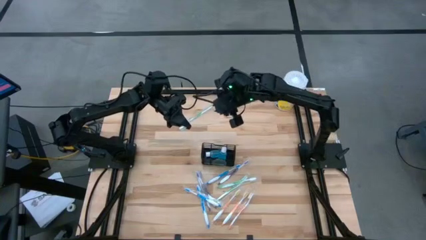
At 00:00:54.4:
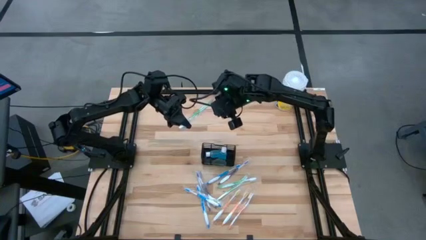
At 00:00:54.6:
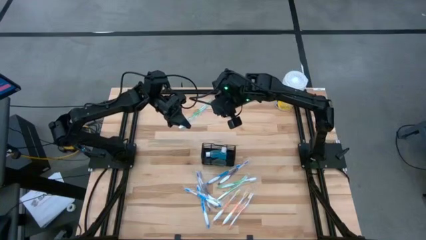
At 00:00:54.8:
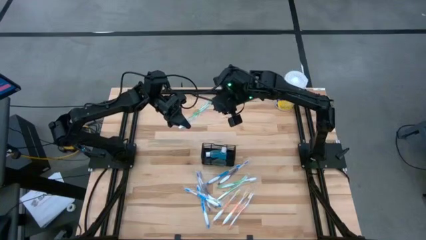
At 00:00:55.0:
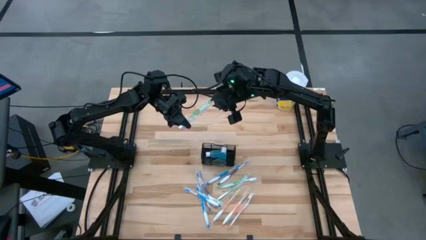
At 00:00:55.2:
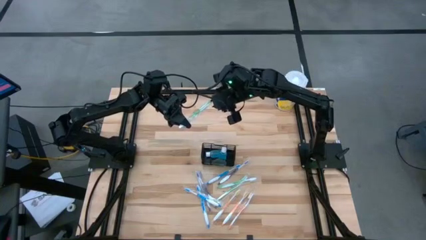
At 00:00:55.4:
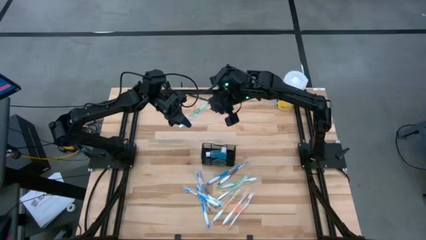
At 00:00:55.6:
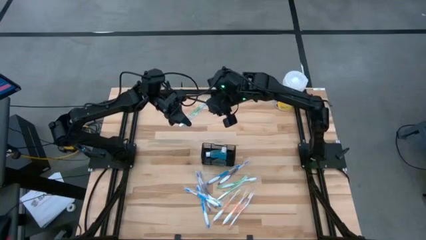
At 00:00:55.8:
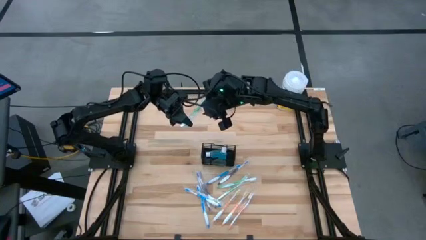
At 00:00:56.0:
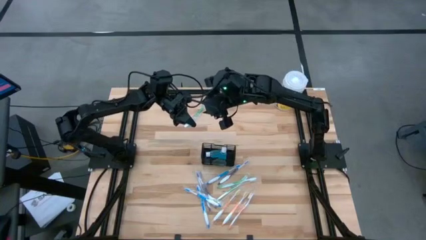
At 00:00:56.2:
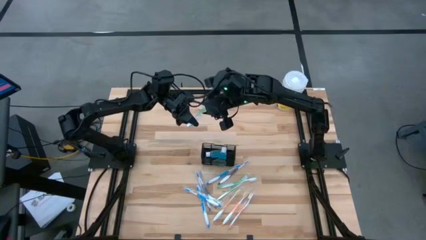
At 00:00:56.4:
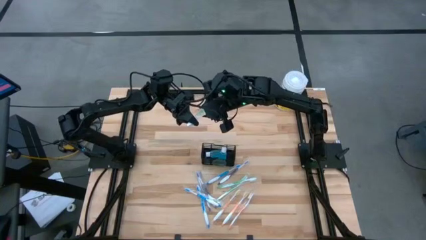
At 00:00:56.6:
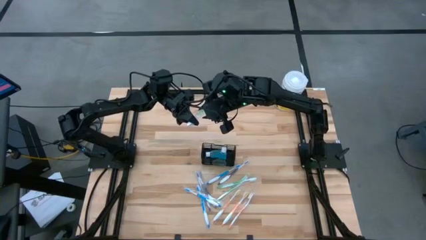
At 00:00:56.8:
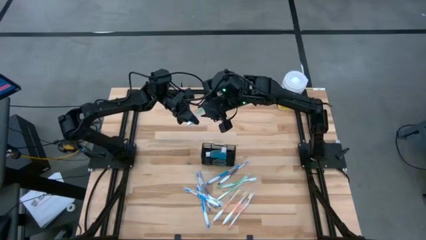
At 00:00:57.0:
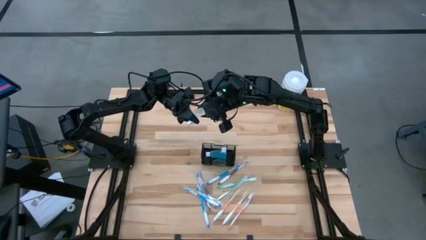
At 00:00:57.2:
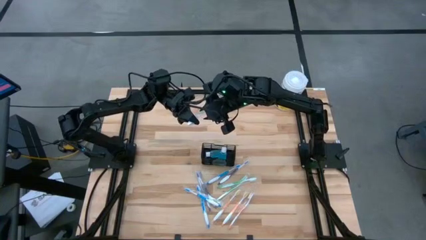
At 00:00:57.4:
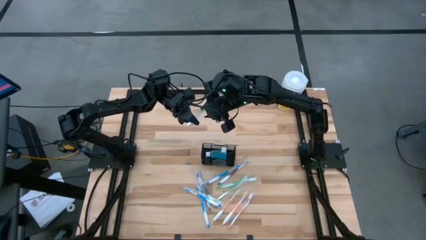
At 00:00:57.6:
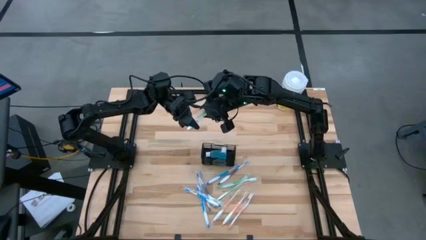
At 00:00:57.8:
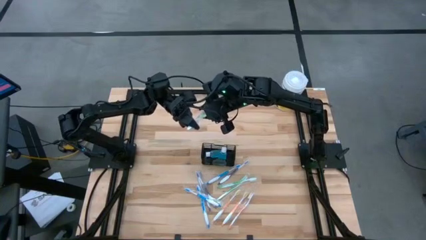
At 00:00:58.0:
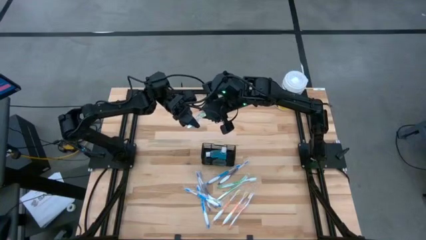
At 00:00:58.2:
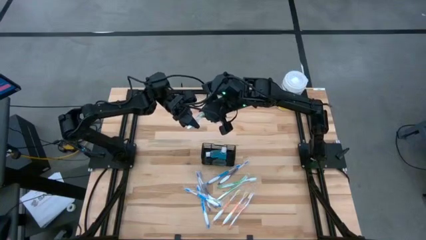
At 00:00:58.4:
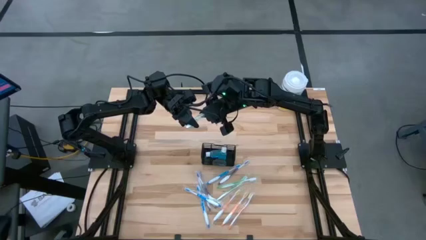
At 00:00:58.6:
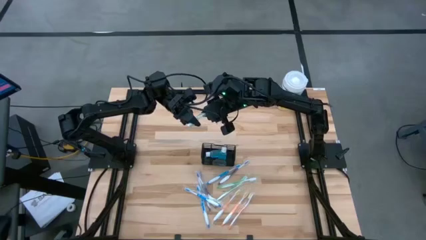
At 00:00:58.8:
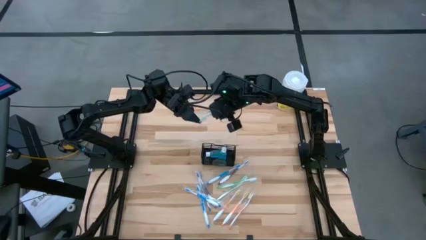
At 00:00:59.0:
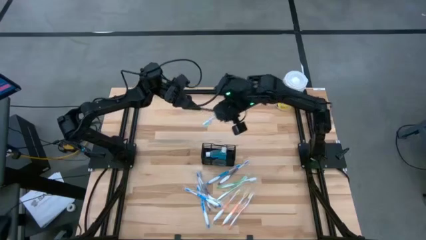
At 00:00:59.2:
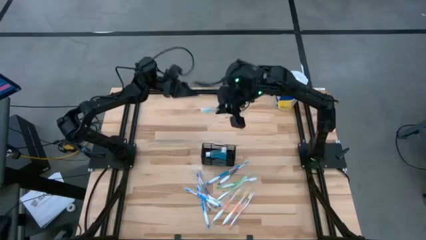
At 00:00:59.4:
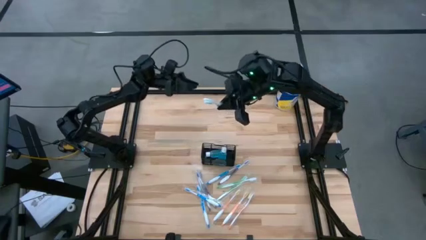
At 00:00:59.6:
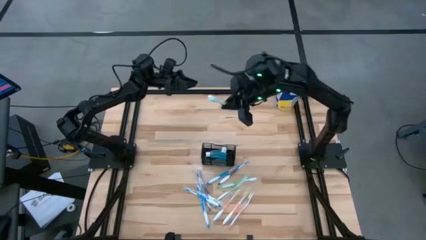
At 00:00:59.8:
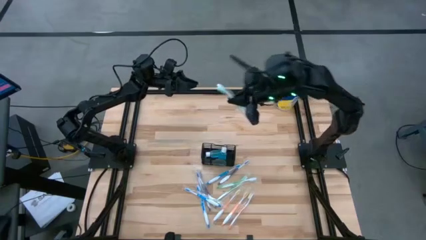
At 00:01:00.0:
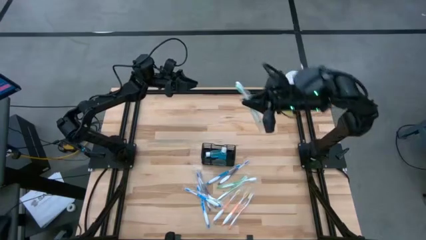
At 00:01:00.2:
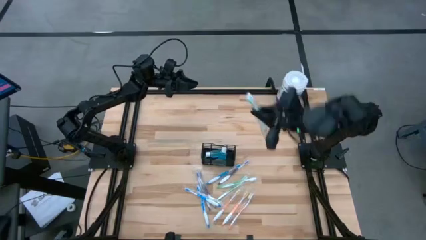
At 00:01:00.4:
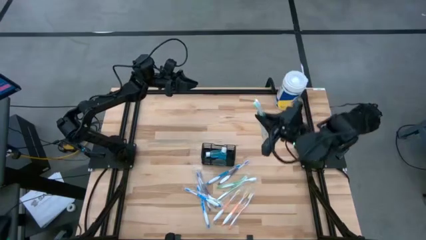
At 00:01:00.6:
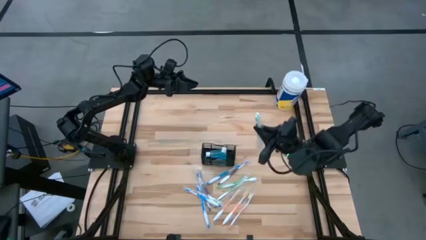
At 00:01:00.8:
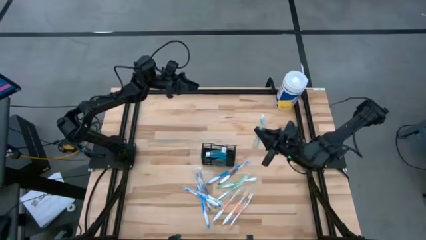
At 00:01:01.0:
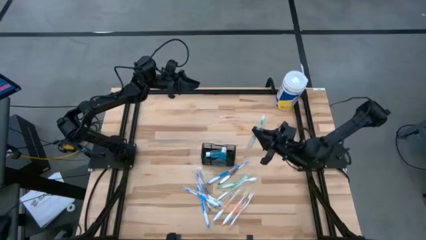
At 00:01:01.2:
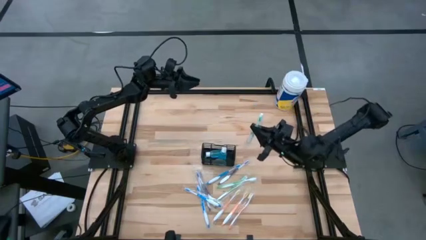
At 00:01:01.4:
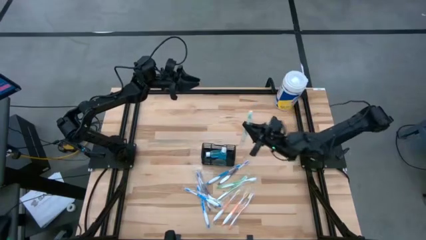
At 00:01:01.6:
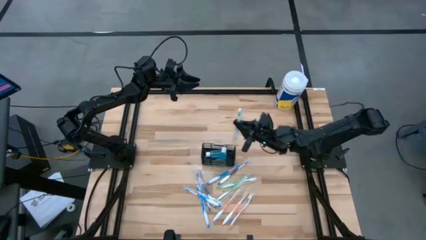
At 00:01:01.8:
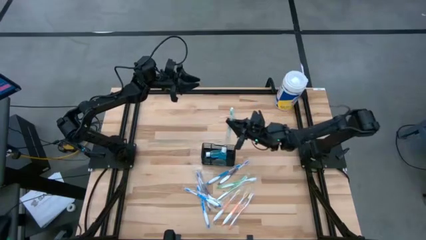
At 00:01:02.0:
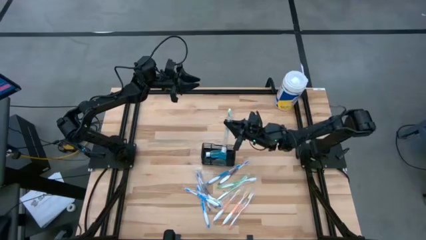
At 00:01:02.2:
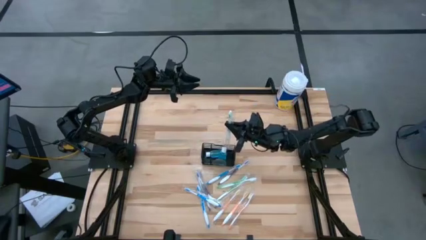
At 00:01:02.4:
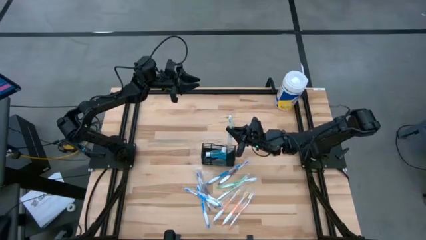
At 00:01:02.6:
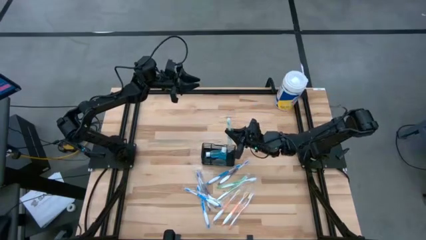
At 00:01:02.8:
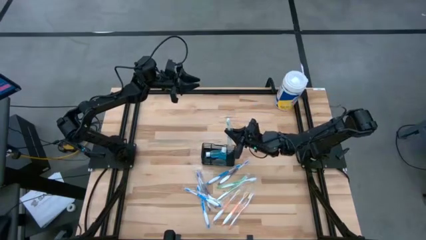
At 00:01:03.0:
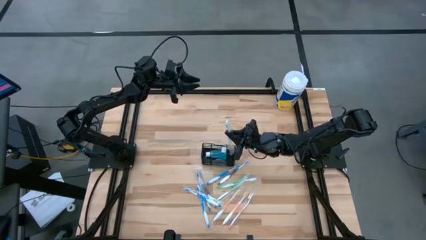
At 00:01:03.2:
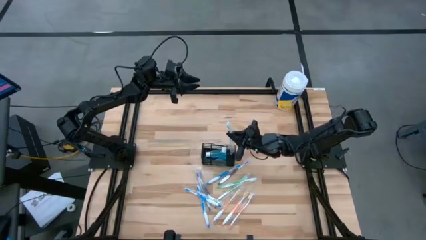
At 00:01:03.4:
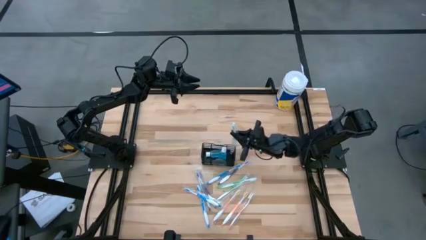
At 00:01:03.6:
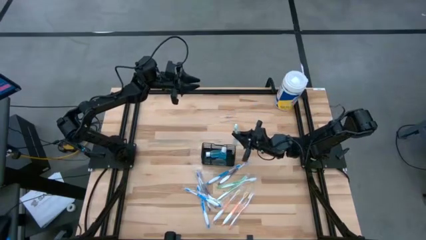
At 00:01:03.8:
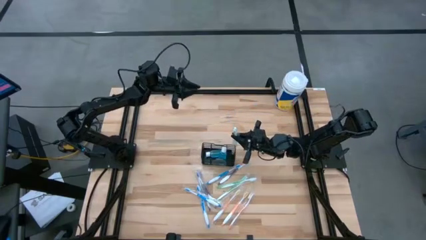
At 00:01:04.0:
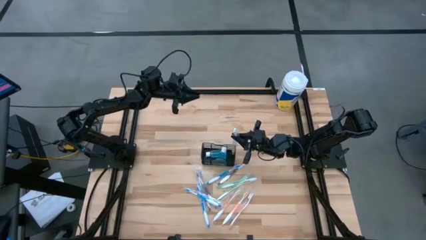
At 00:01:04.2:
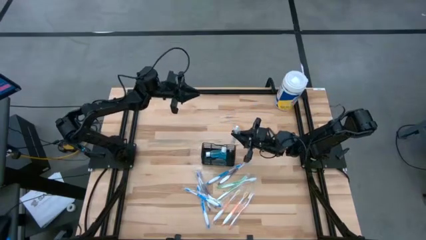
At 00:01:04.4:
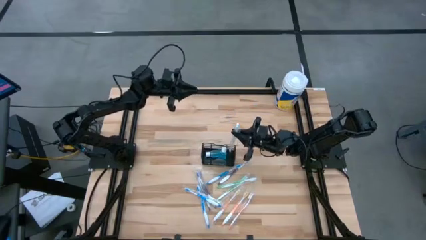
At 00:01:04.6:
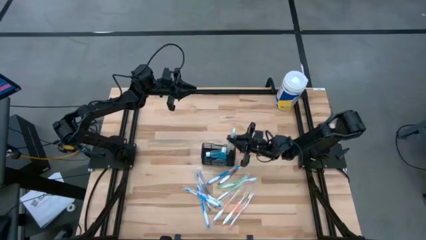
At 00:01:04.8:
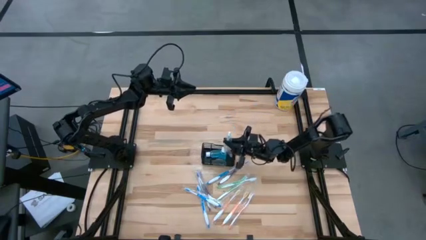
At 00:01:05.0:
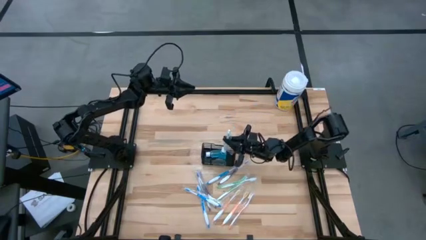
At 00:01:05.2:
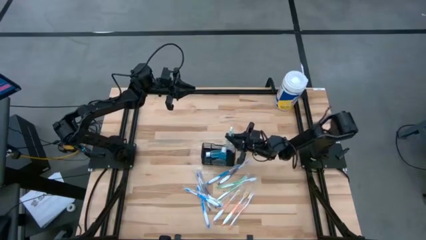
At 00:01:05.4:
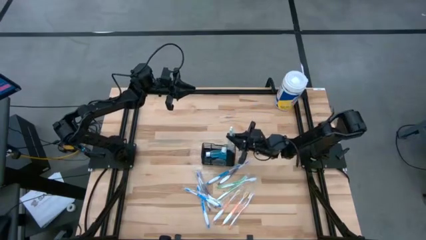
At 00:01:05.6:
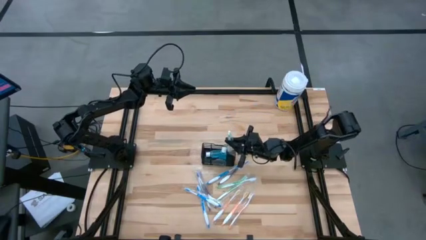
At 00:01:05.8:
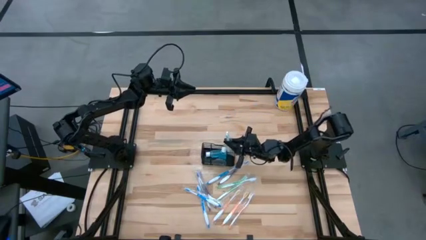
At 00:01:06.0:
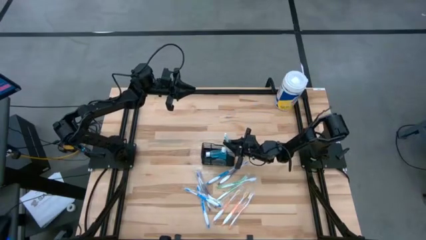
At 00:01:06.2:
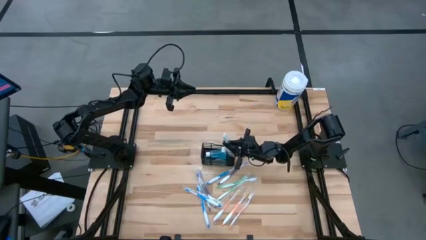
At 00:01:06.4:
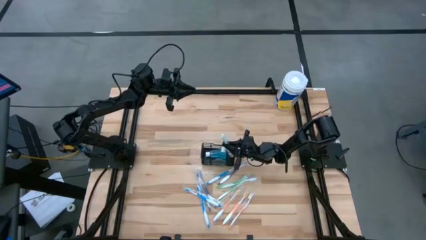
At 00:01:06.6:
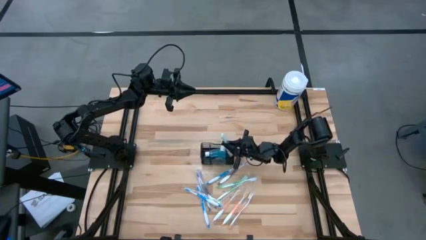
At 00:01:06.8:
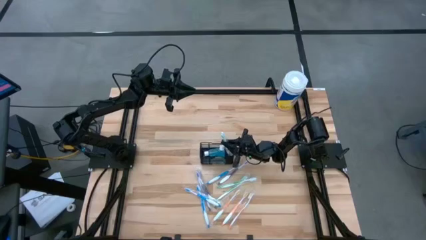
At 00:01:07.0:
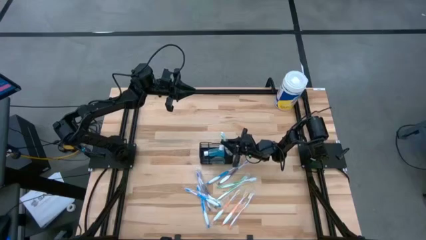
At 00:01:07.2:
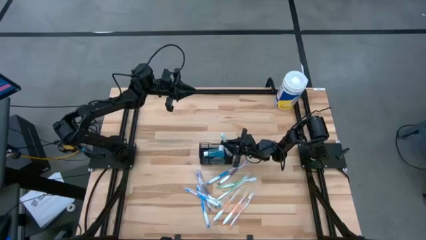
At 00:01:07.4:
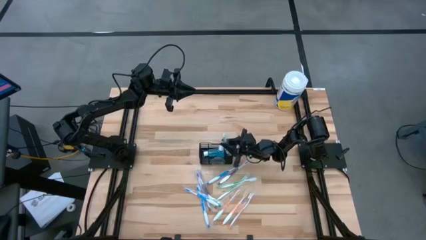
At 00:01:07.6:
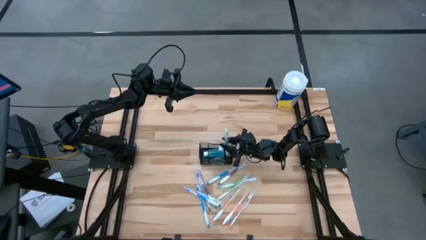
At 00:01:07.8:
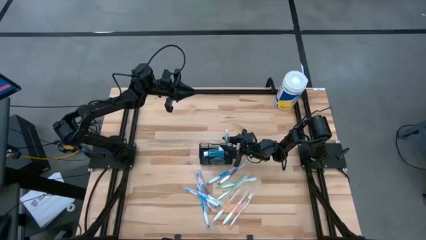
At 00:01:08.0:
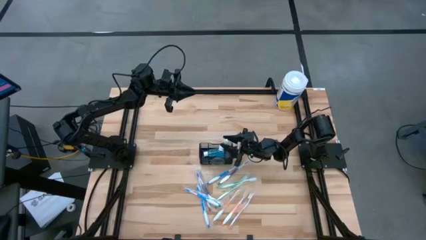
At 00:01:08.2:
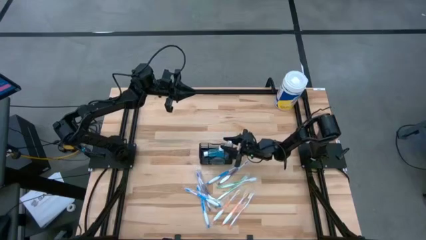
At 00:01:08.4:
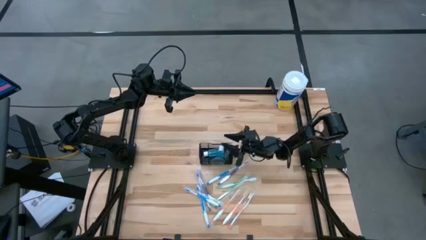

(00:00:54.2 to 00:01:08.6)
Task: Pick & Place toothbrushing station
Put the green toothbrush into the black wire organizer

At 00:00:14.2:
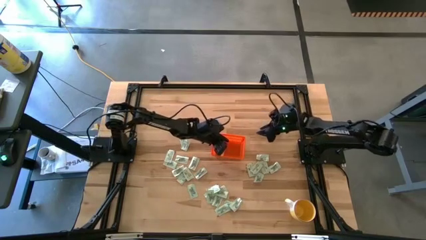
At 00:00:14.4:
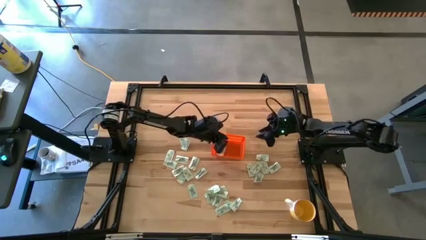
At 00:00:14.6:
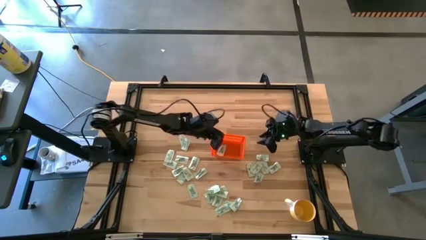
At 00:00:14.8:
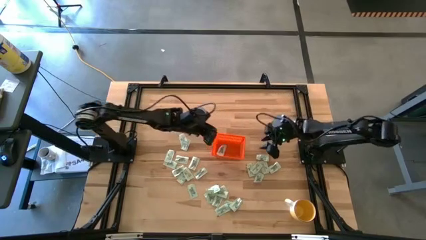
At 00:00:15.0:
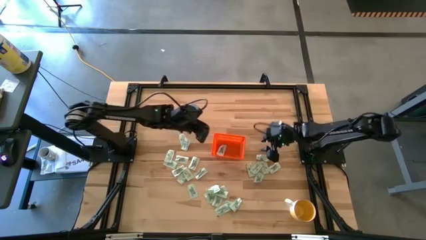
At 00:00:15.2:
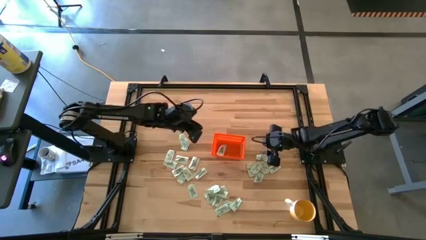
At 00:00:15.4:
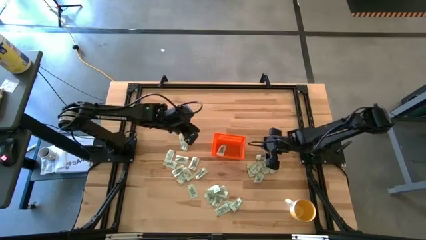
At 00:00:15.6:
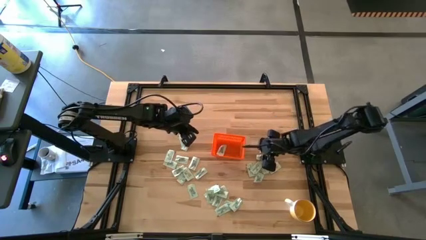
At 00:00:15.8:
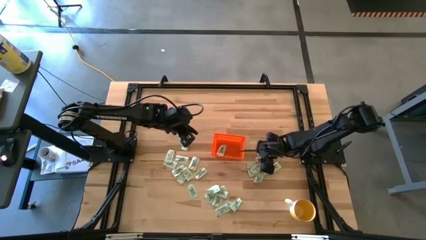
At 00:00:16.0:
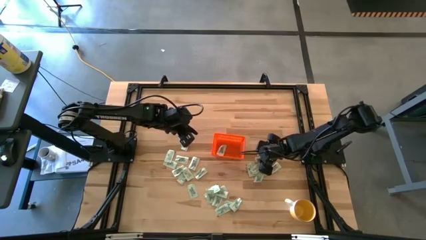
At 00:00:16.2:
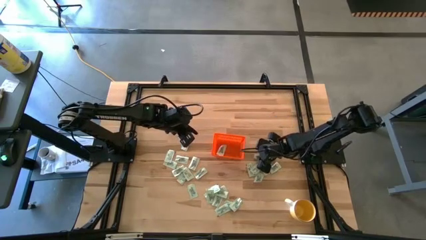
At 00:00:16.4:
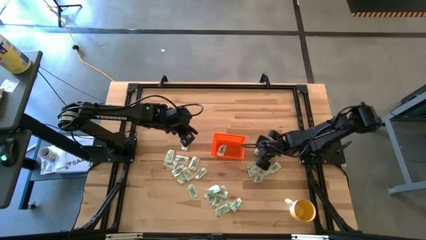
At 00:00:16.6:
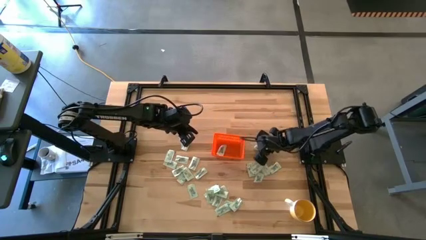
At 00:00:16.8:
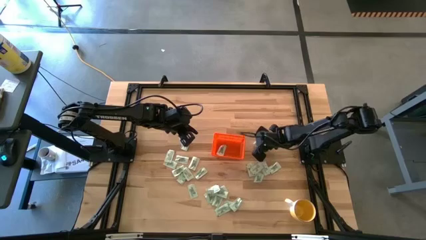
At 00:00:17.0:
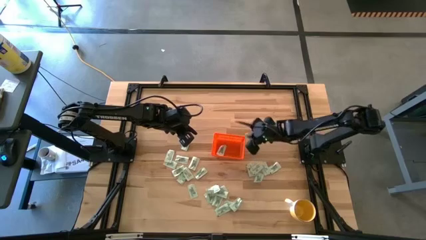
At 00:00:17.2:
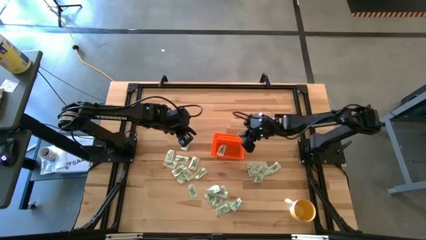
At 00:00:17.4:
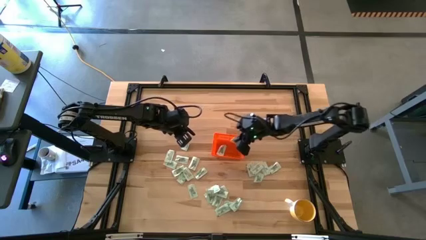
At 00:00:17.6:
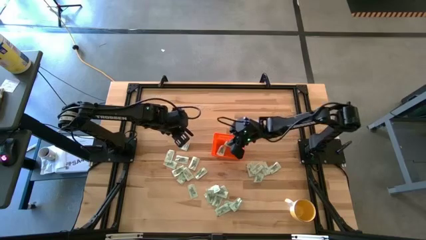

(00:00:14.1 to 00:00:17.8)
Task: Pick and place Stevia / Truvia into bins
Put the white stevia packet into the orange bin
